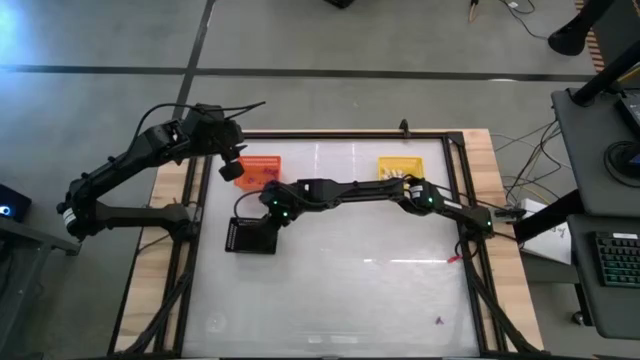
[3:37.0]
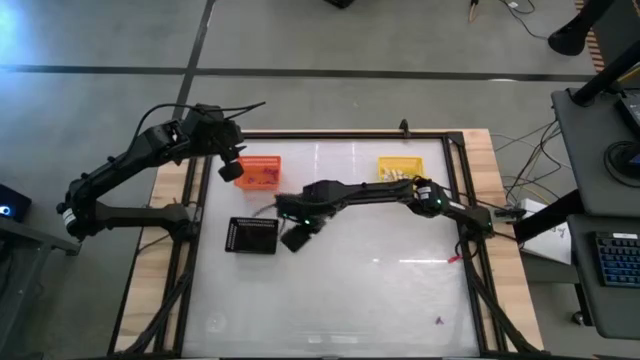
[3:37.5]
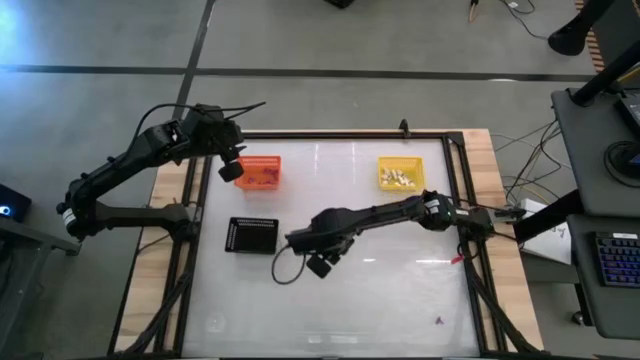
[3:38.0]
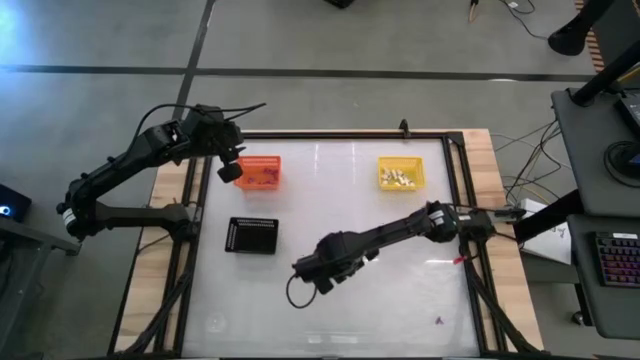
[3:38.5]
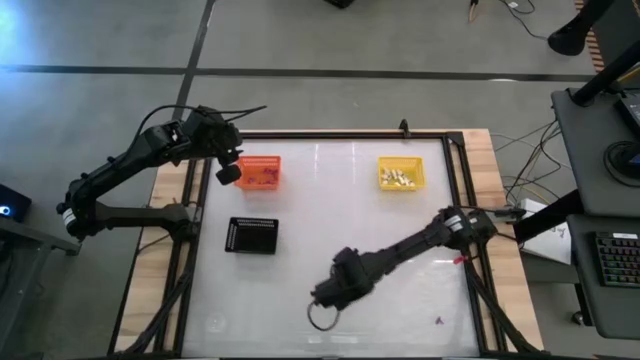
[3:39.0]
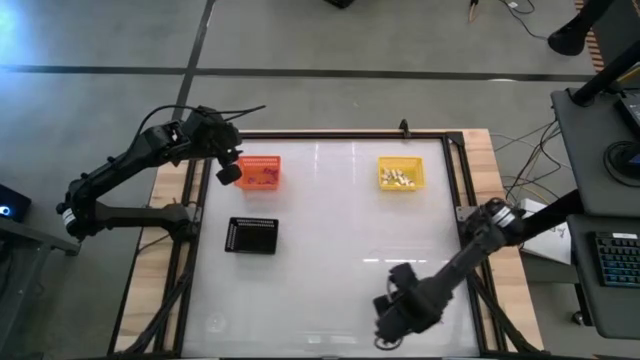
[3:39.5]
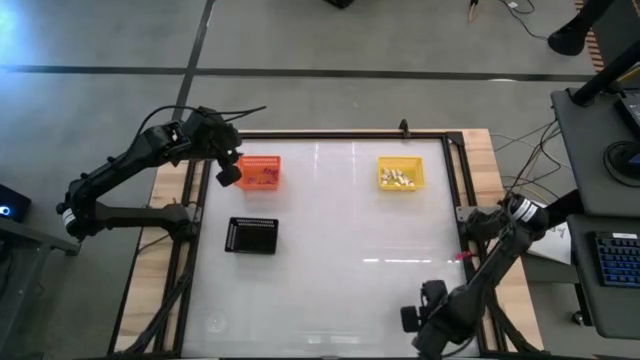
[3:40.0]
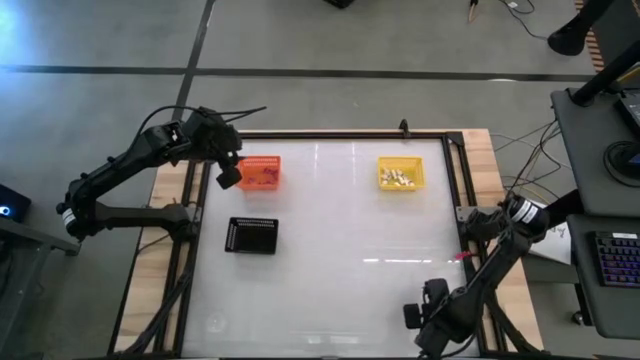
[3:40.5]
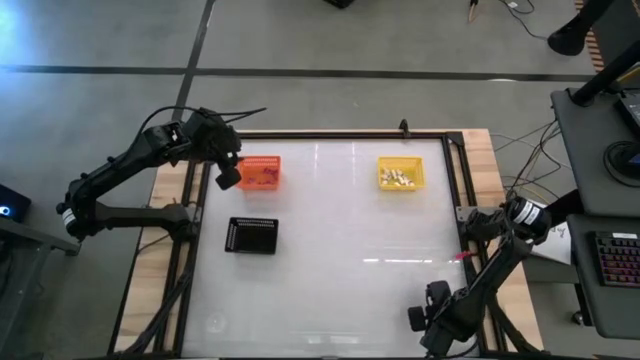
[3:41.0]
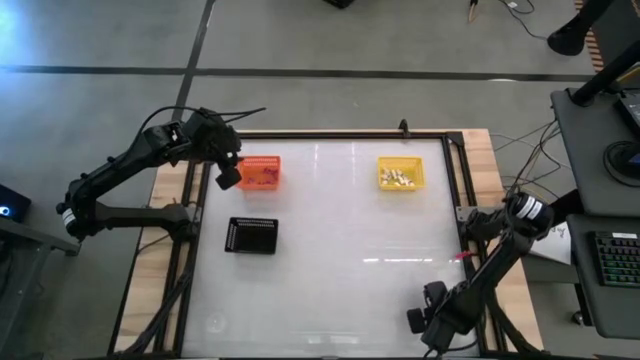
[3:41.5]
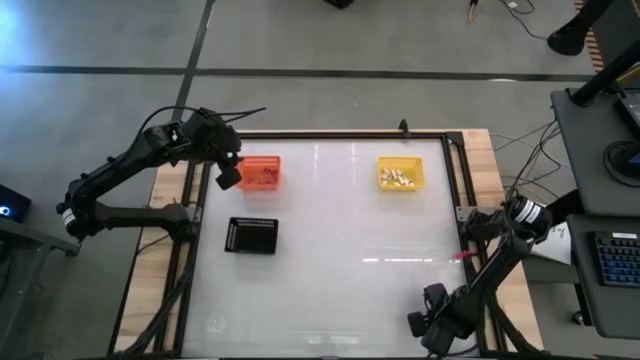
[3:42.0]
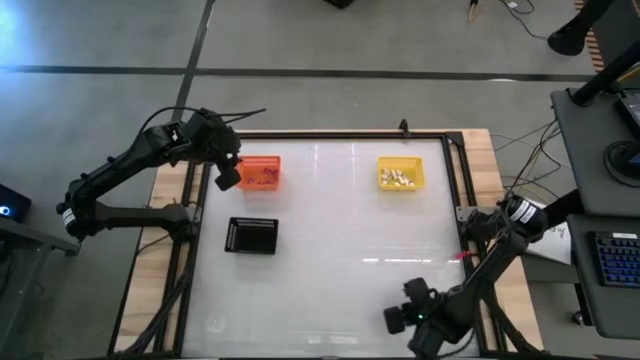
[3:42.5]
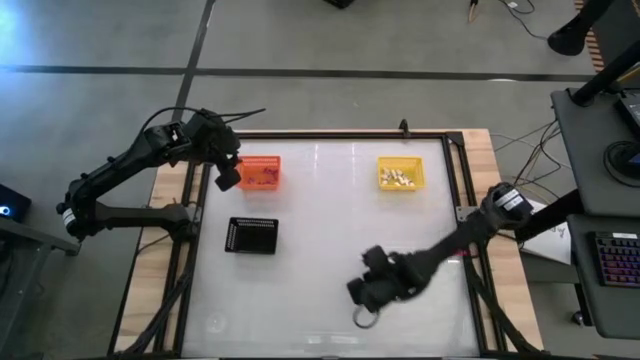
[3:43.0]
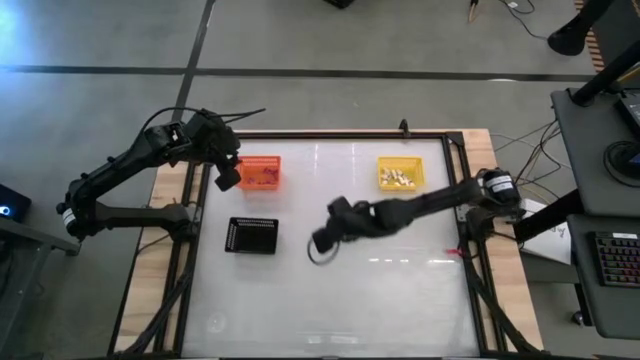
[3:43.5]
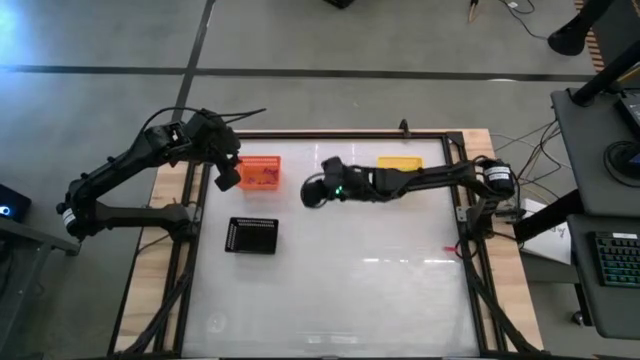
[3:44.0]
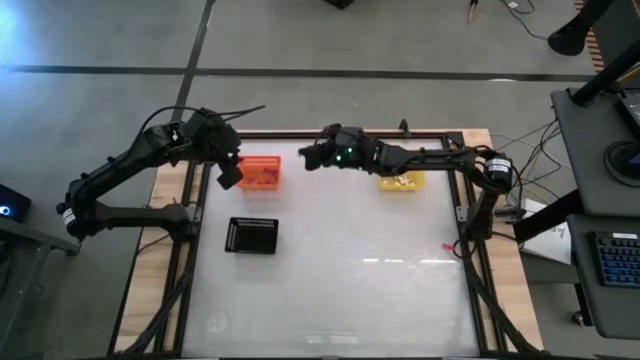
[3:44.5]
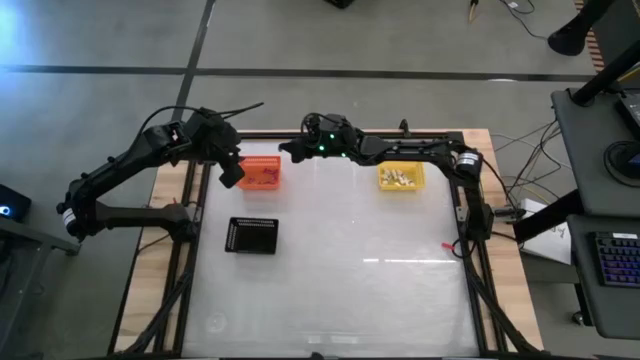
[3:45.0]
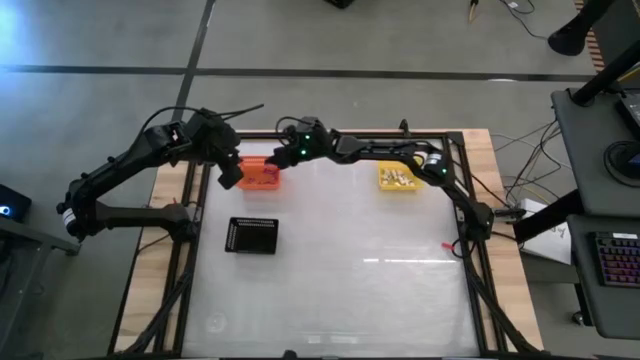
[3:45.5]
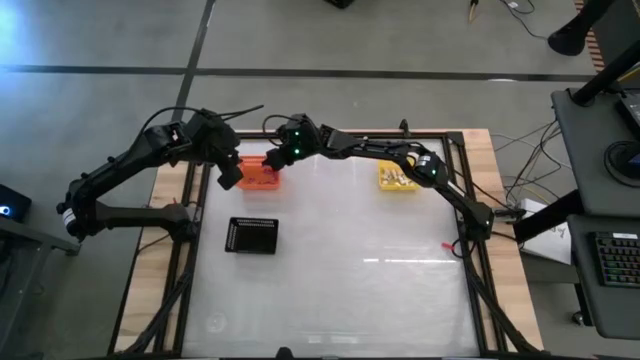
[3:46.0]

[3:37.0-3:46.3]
Task: Sort Halloween decoration
Put the violet witch hat toy into the orange bin

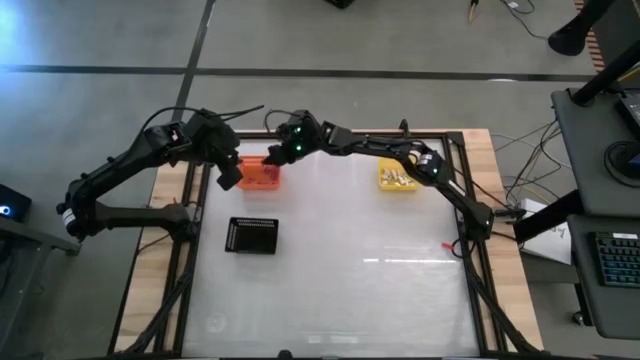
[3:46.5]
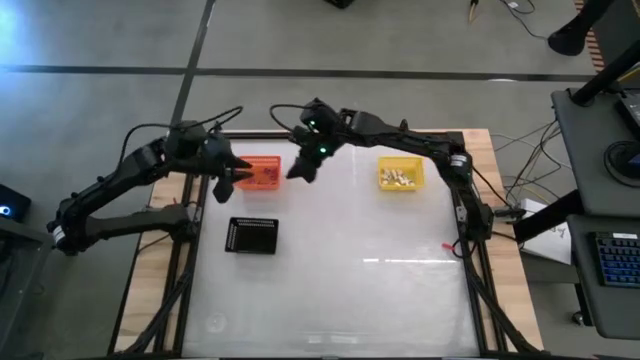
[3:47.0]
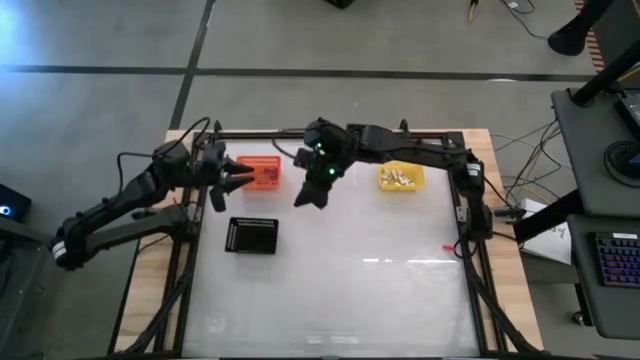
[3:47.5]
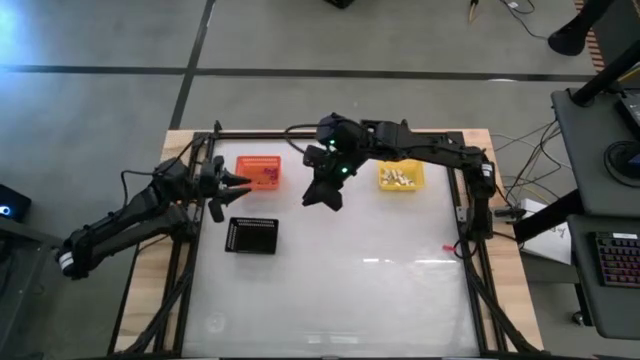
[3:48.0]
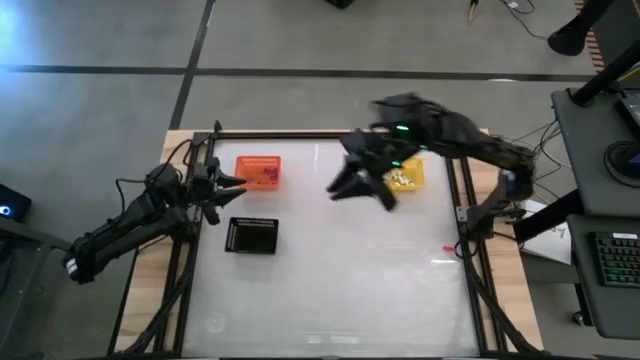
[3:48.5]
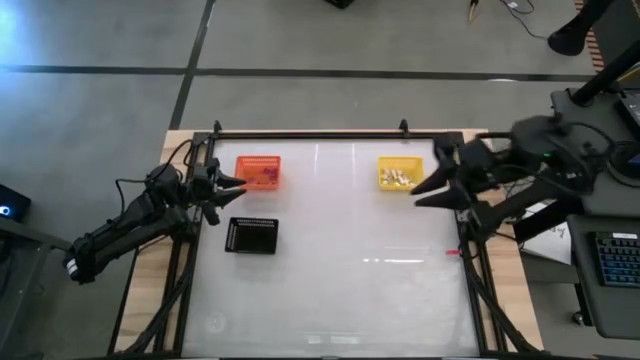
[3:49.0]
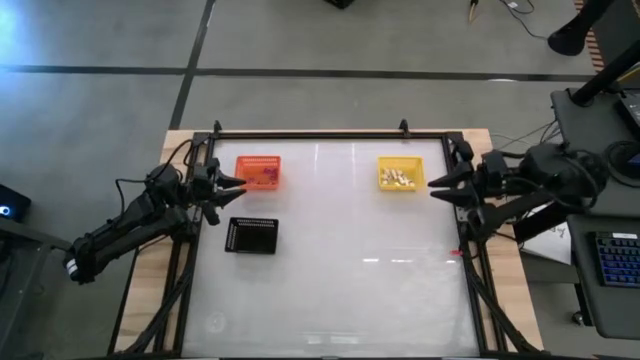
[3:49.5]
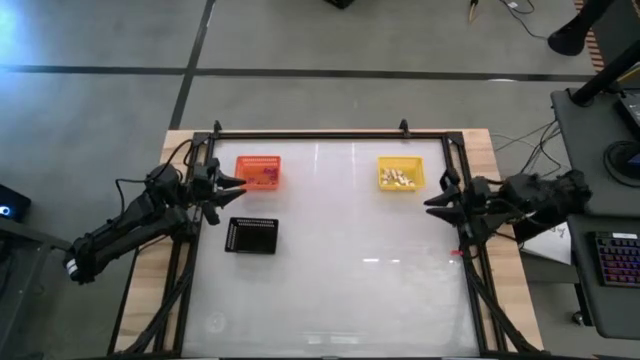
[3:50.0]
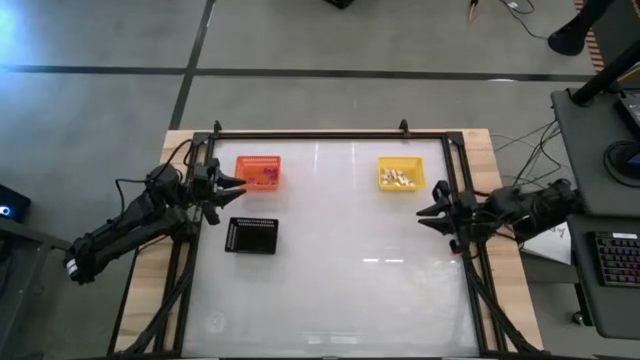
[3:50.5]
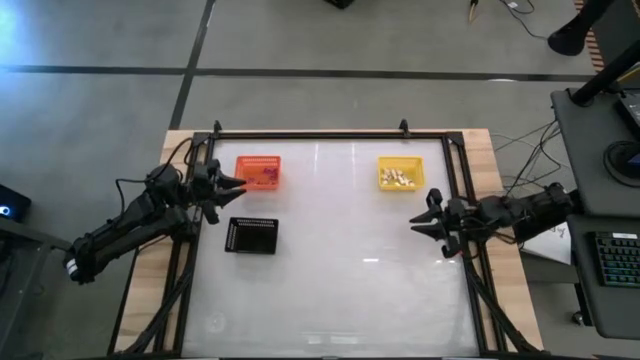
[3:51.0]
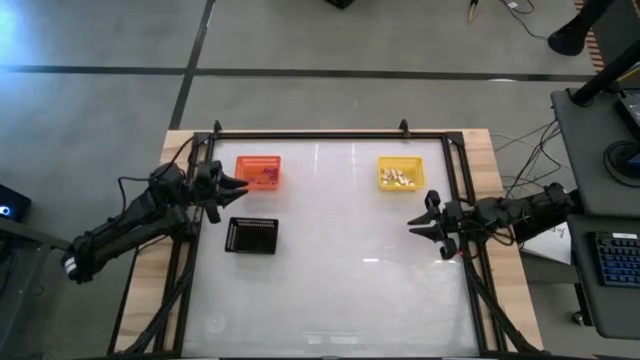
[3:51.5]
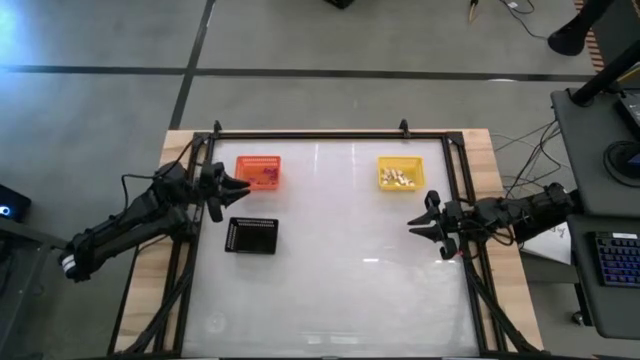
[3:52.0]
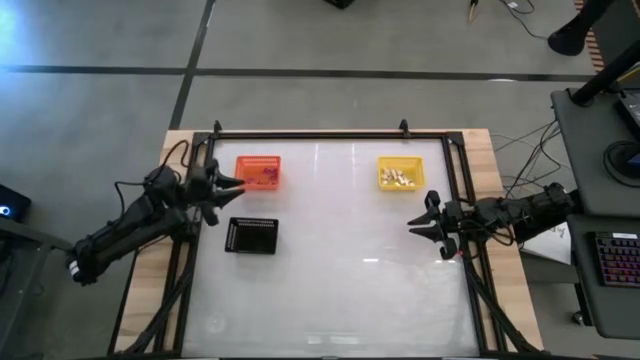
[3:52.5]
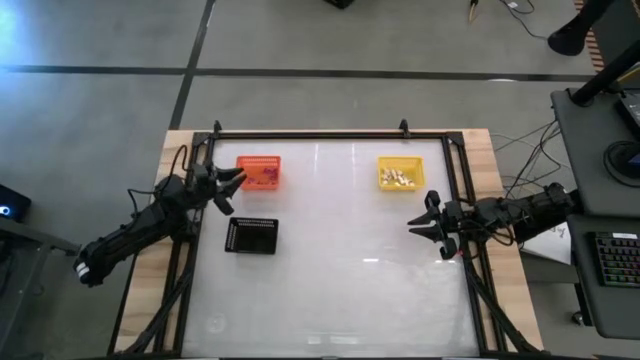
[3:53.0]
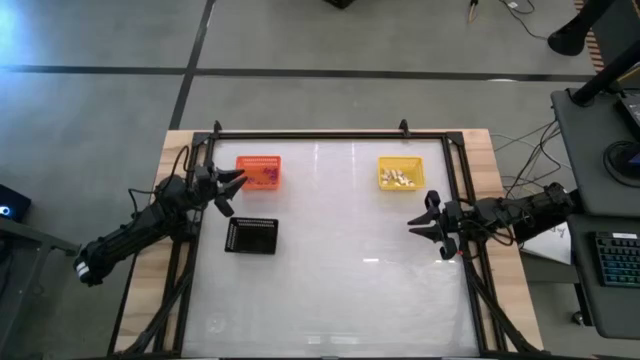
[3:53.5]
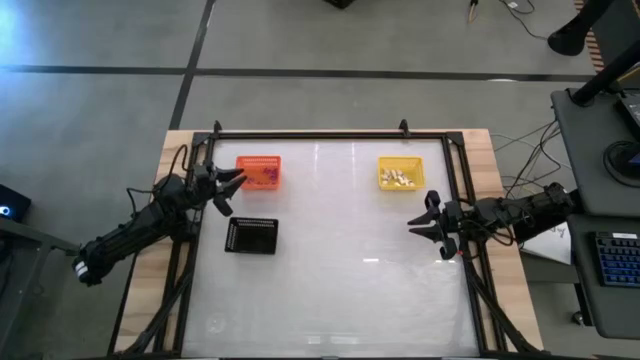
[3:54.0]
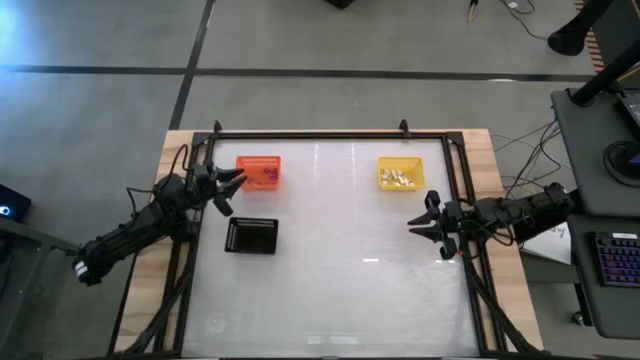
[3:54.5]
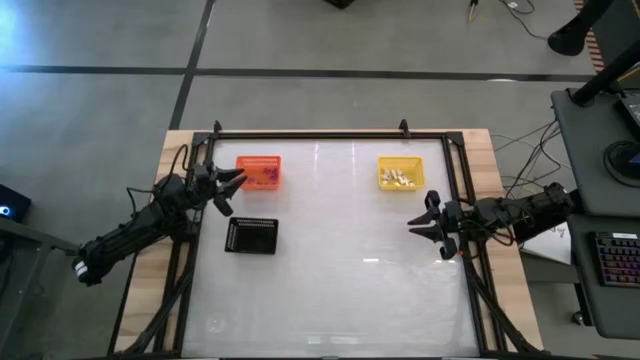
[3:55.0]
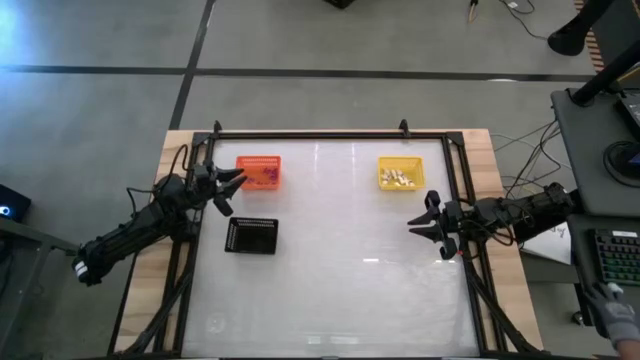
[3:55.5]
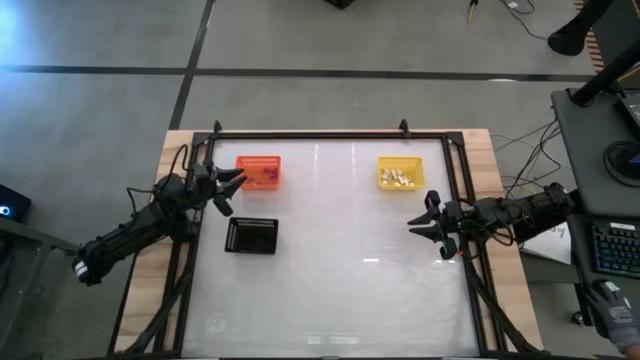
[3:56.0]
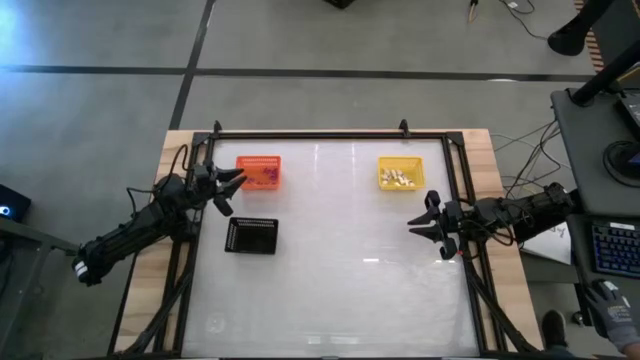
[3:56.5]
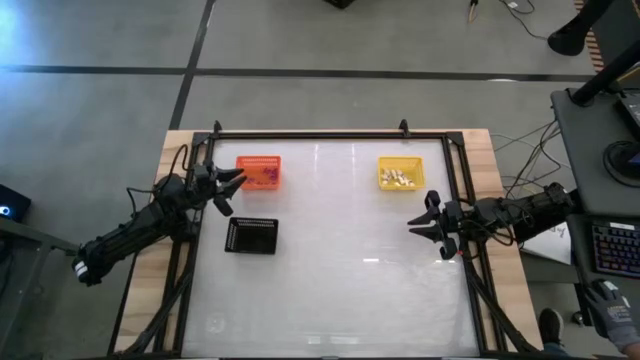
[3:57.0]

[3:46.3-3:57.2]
Return to Home Position
